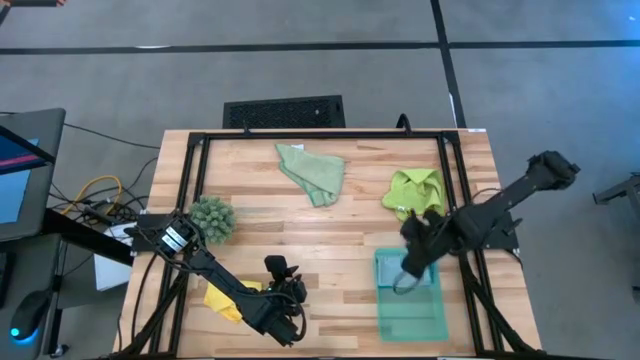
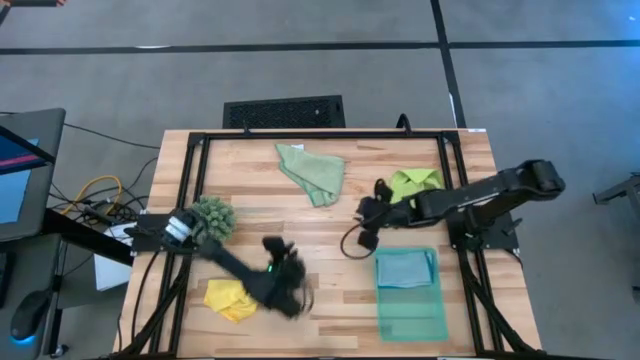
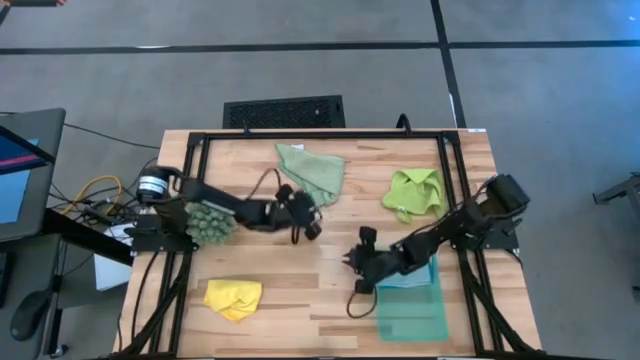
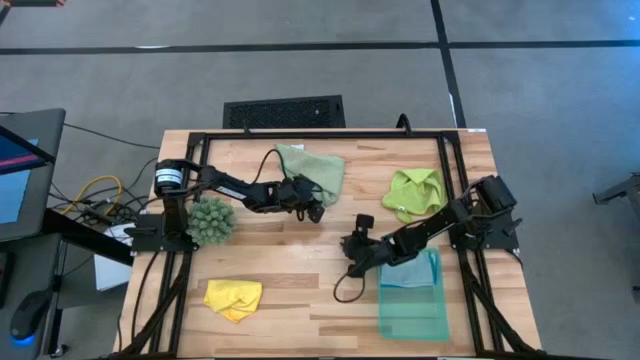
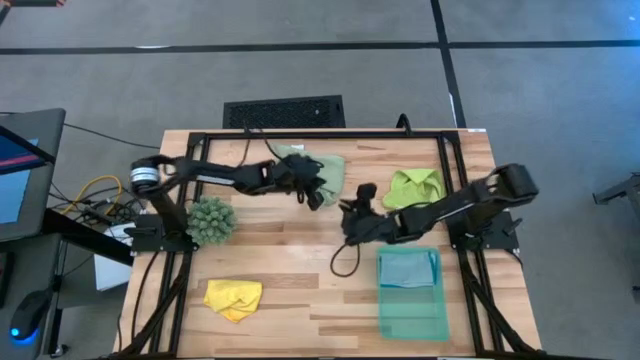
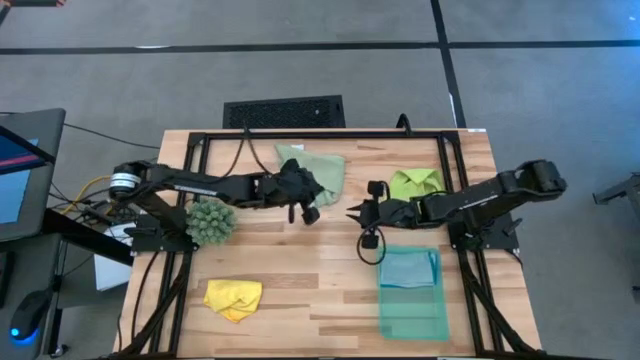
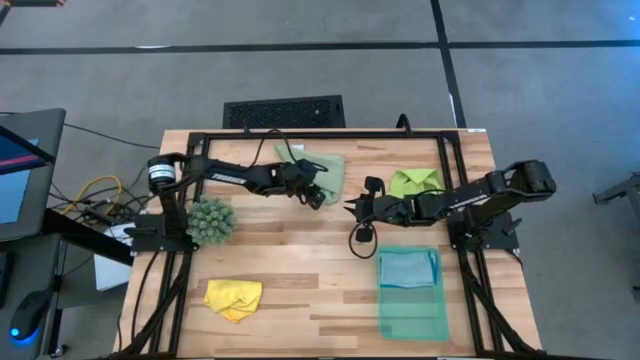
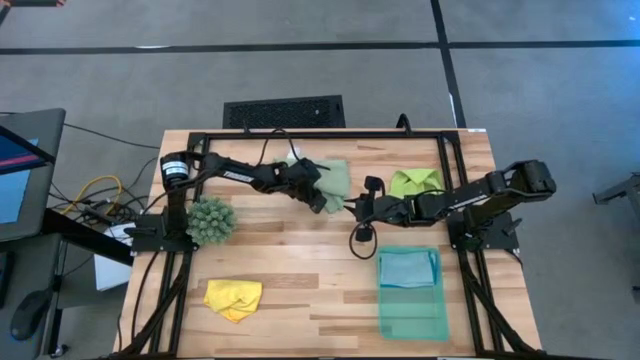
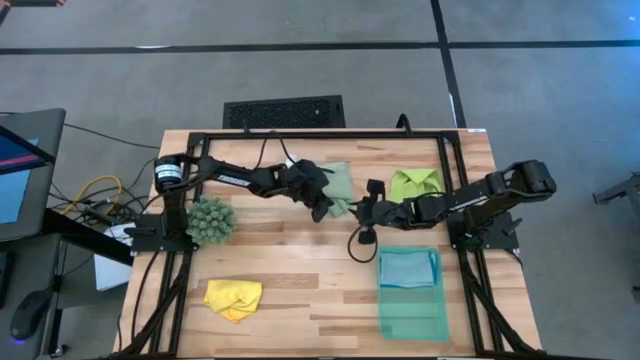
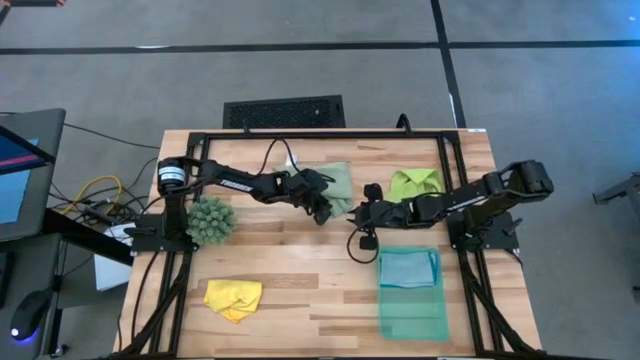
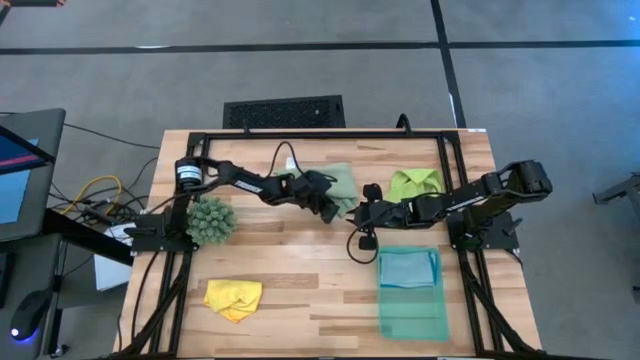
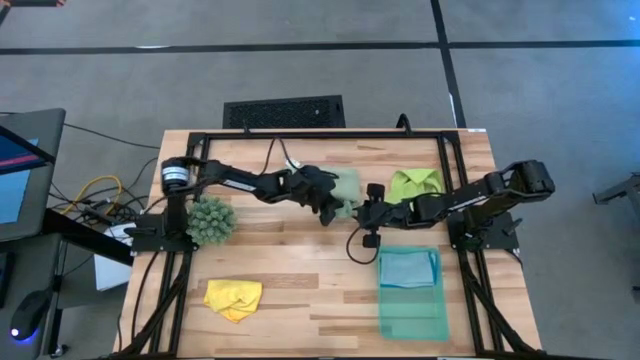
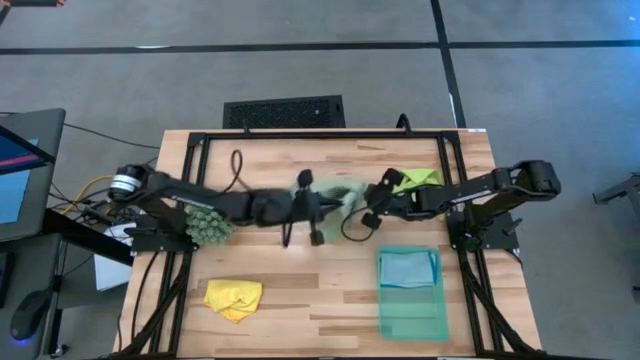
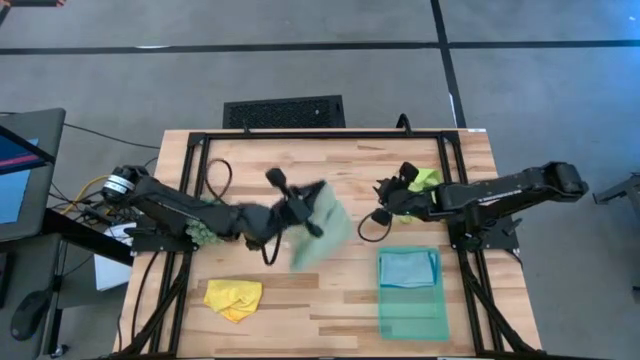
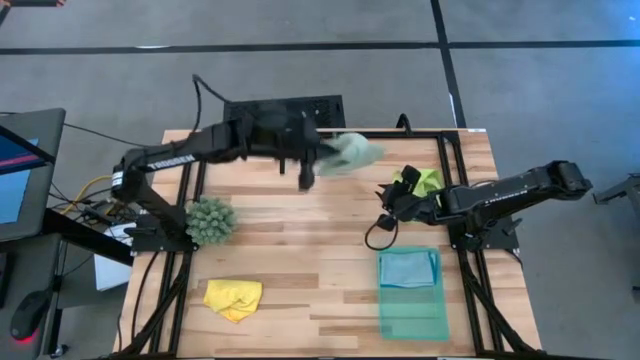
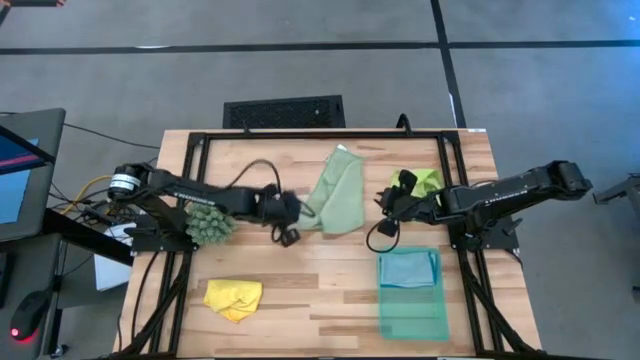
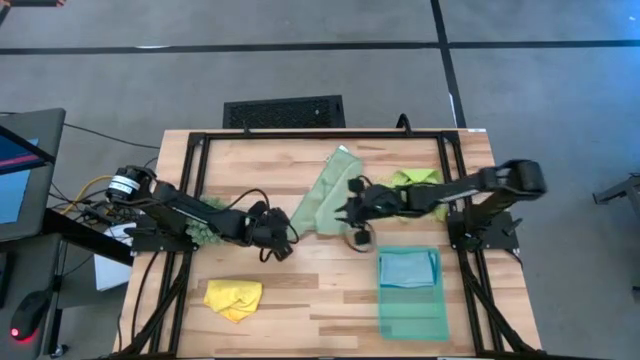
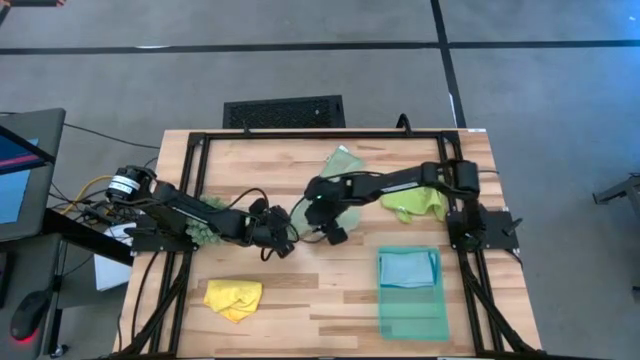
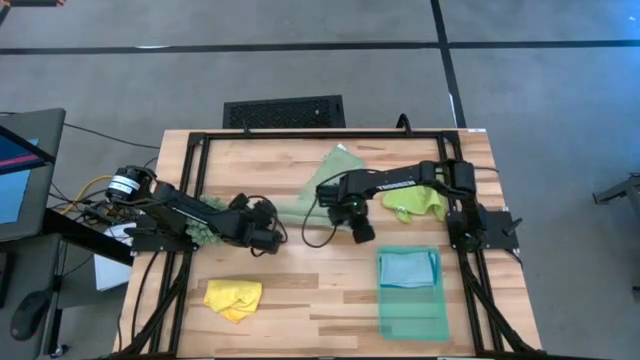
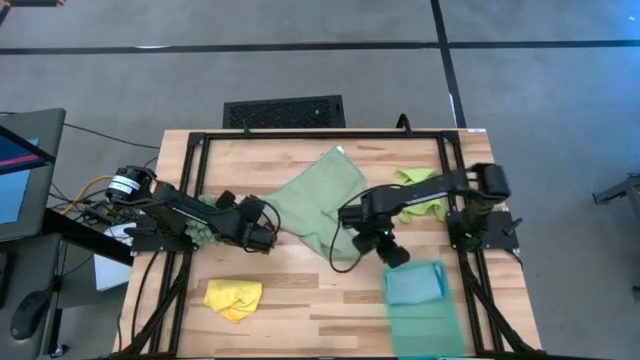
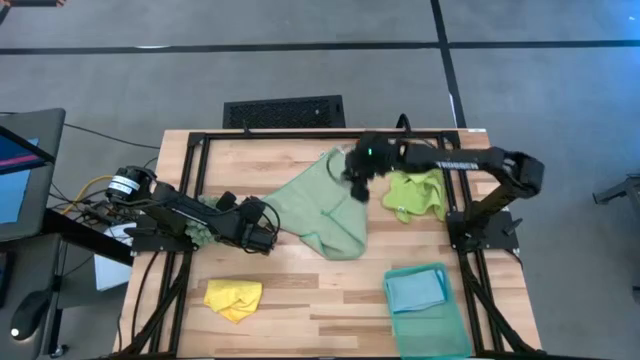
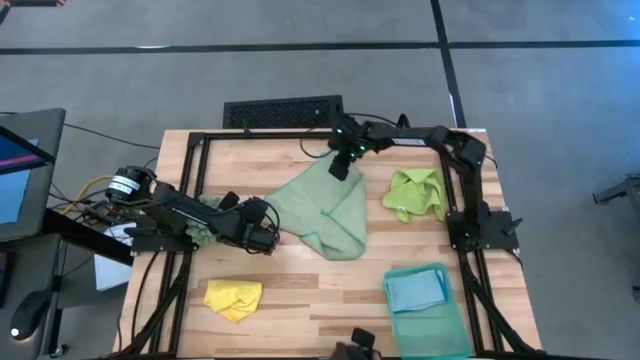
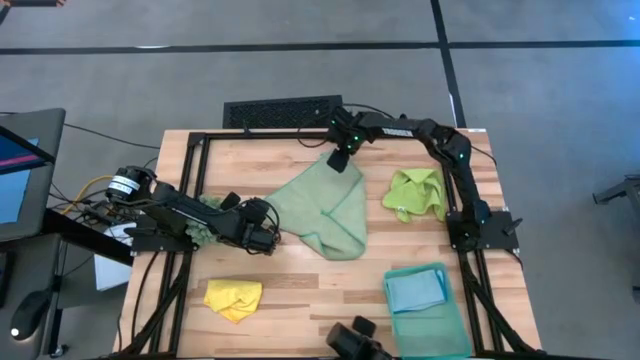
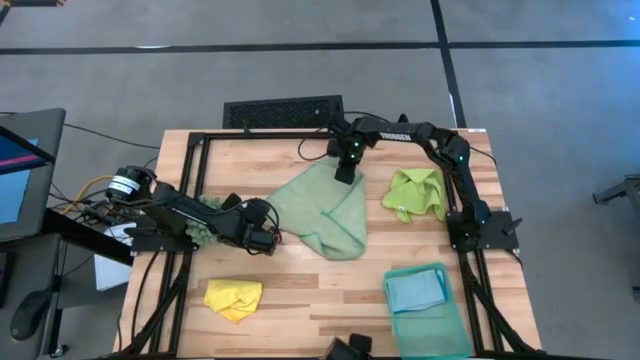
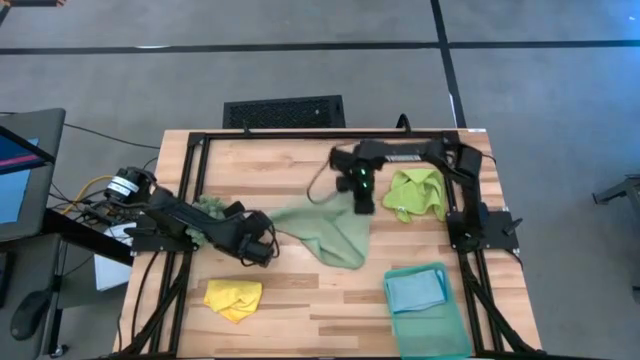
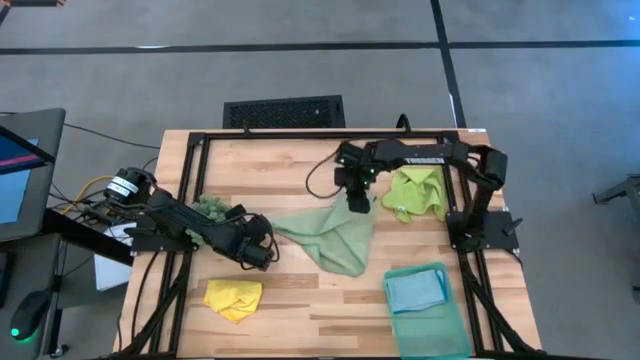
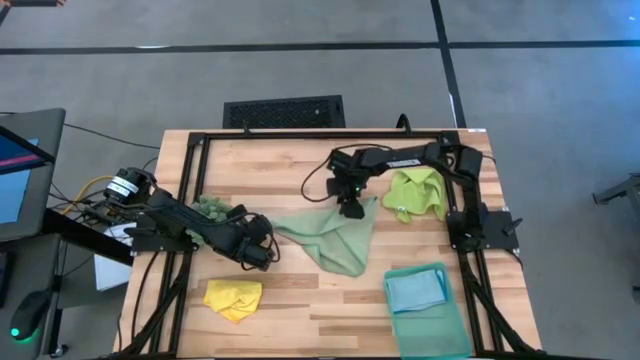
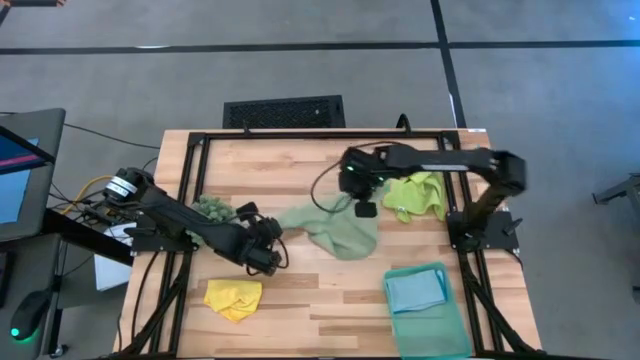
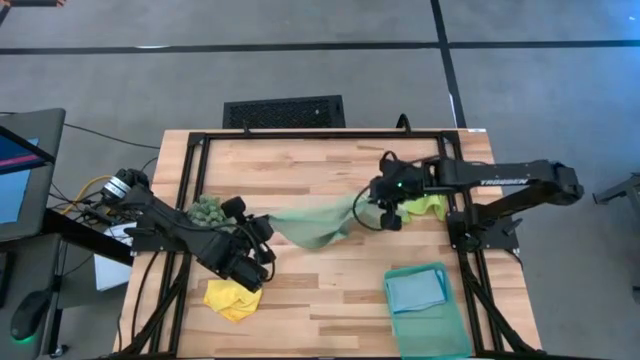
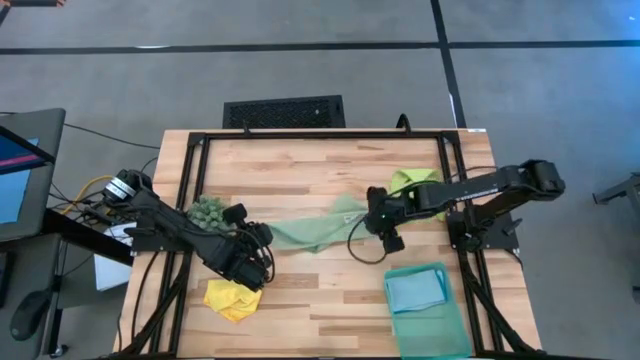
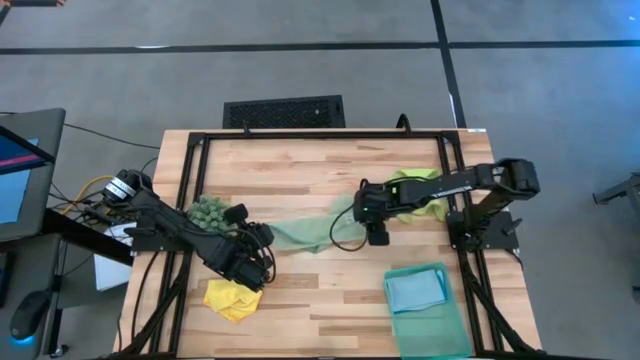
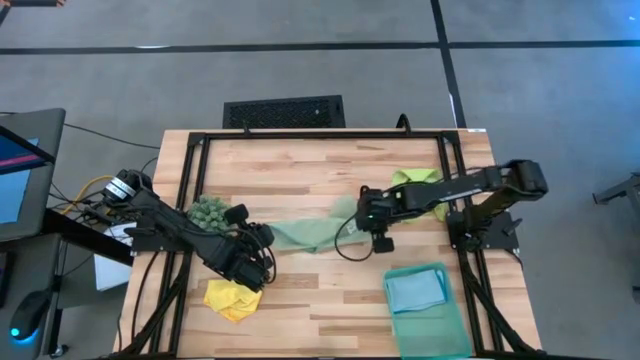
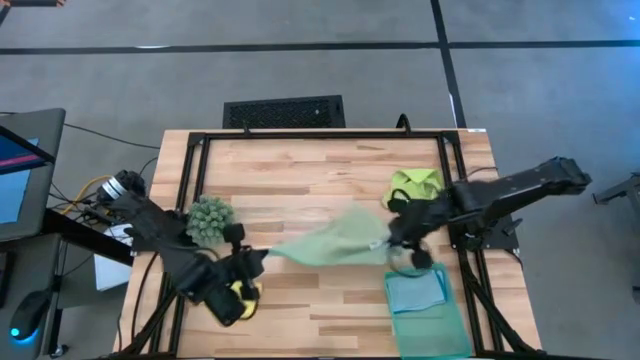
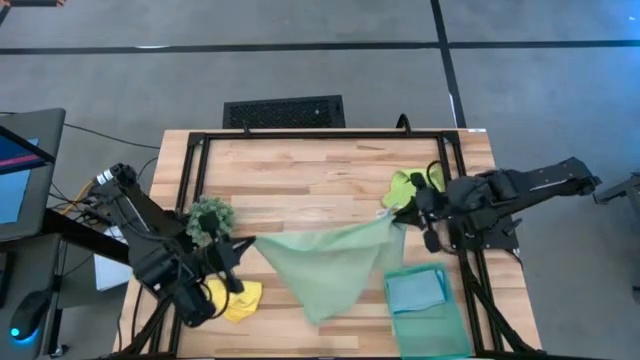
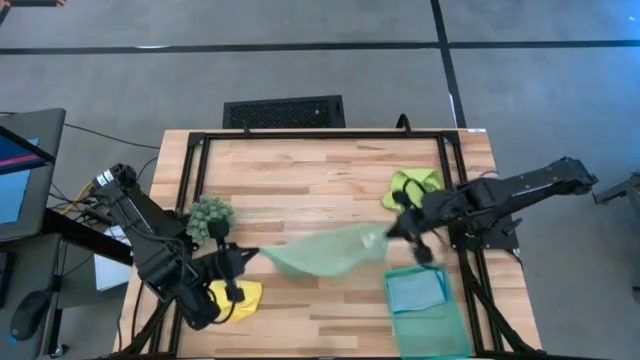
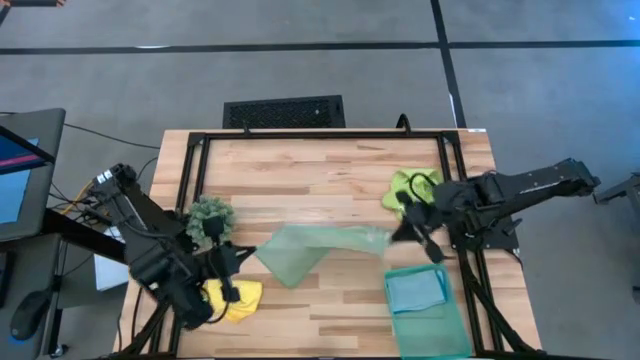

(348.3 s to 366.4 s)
Task: Fold microfiber towels
Fold the green microfiber cloth

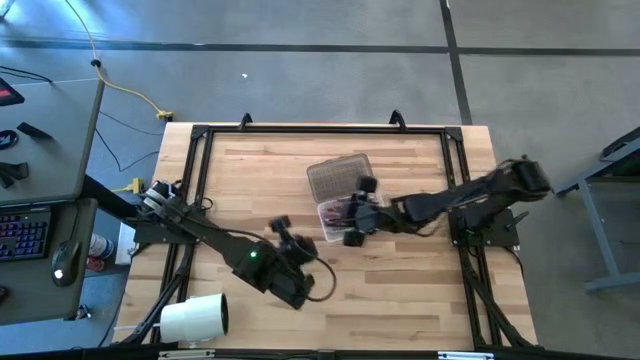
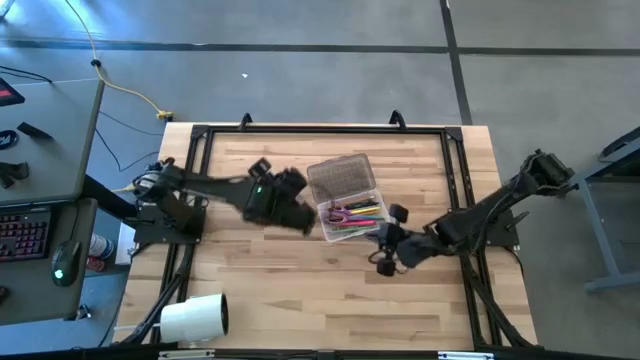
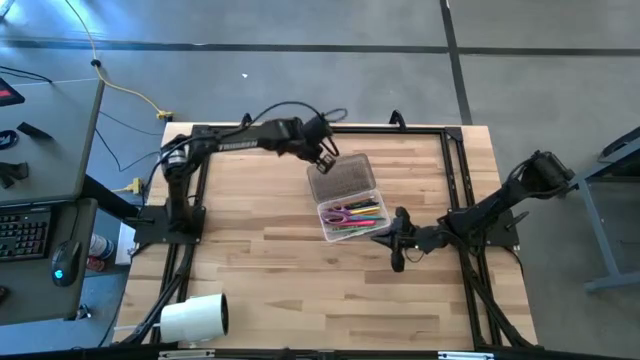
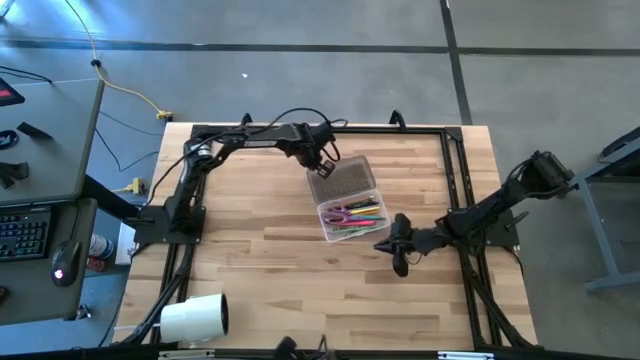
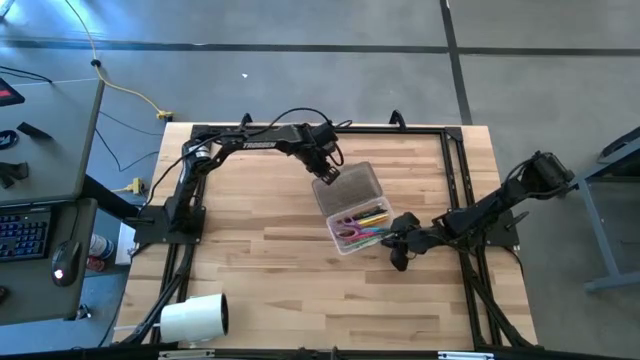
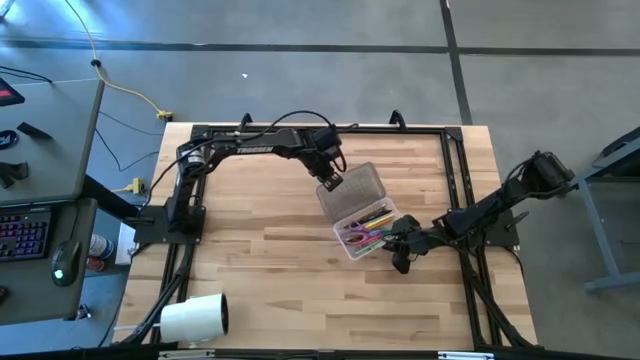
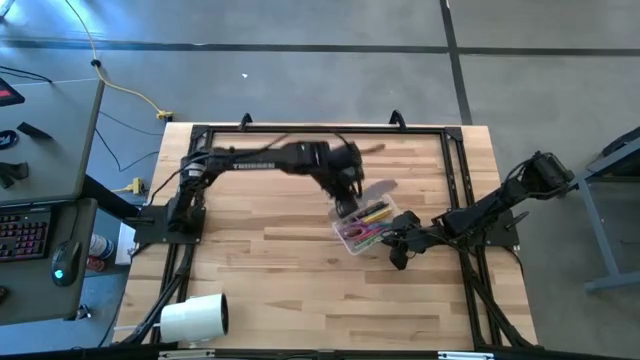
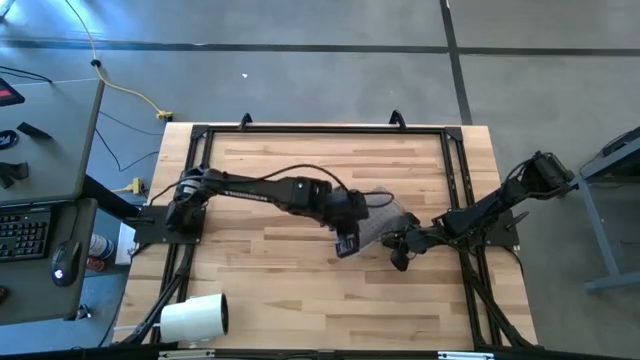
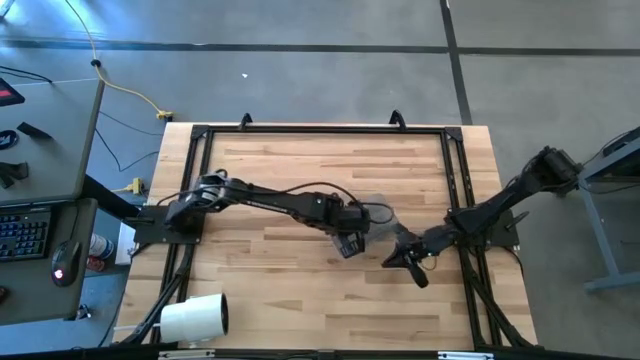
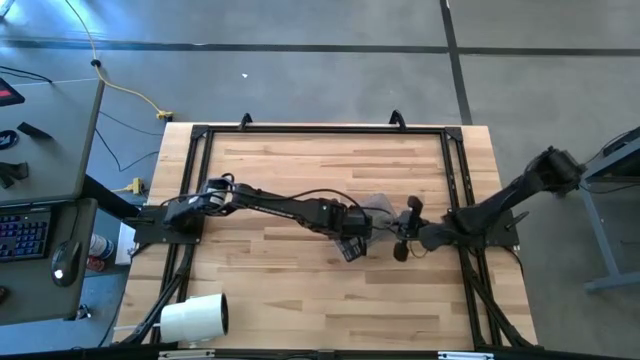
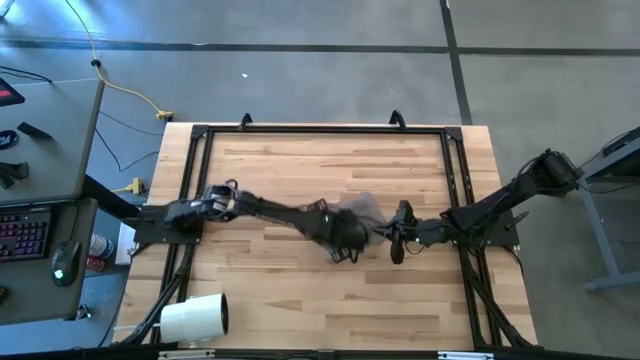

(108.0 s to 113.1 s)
Task: Pick & place school supplies into a supply box
Close the black supply box
